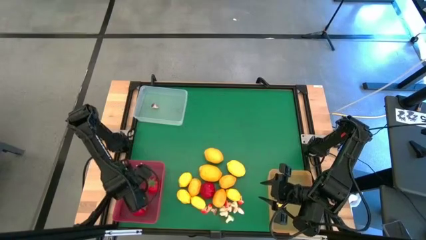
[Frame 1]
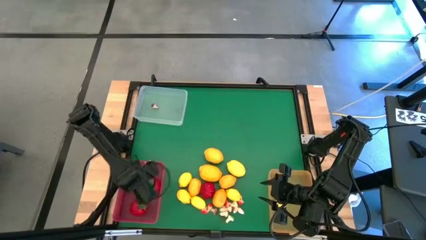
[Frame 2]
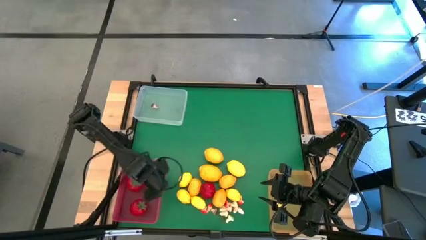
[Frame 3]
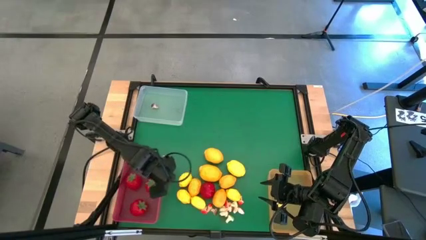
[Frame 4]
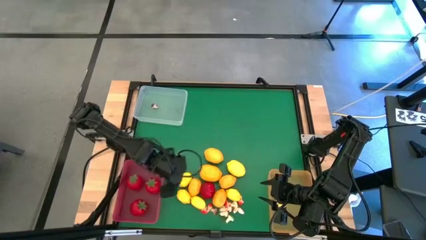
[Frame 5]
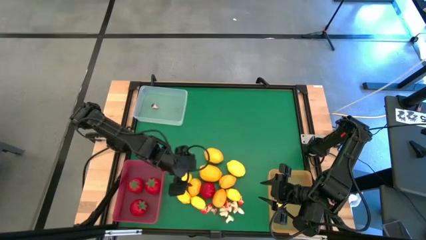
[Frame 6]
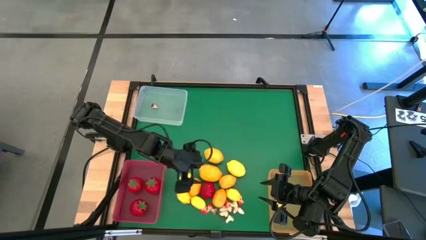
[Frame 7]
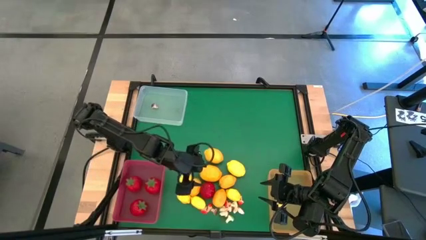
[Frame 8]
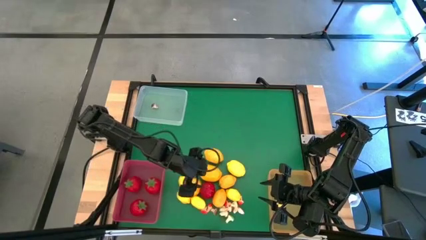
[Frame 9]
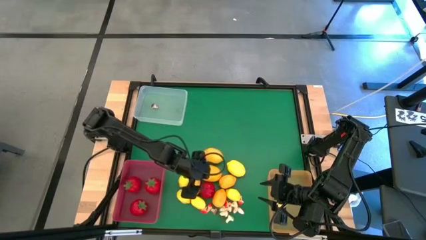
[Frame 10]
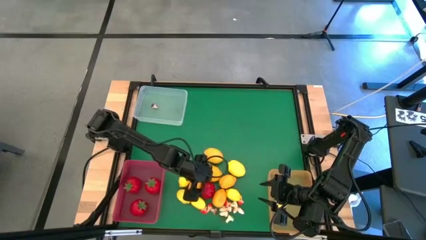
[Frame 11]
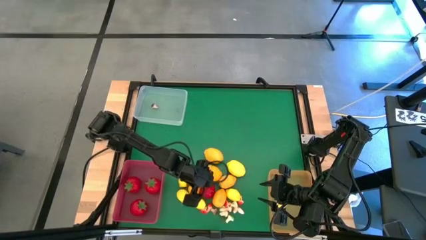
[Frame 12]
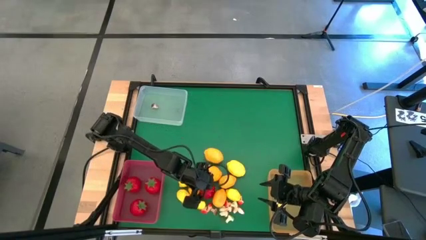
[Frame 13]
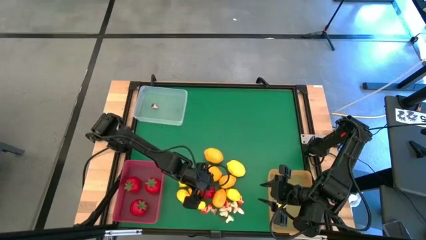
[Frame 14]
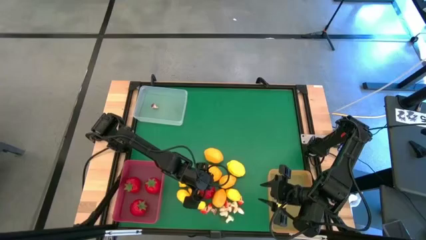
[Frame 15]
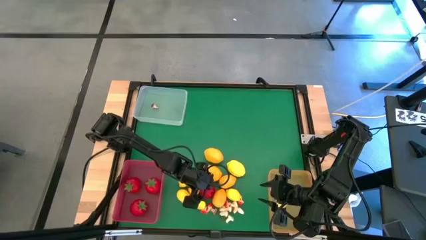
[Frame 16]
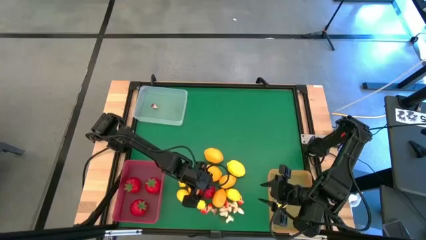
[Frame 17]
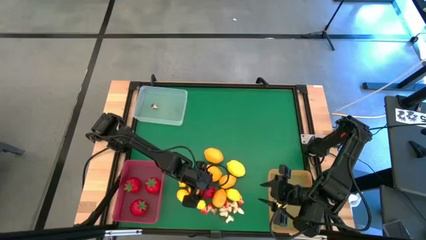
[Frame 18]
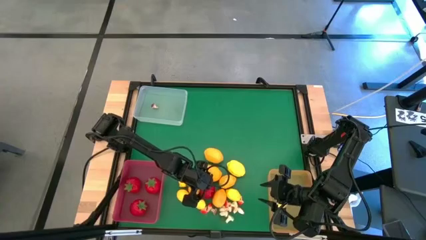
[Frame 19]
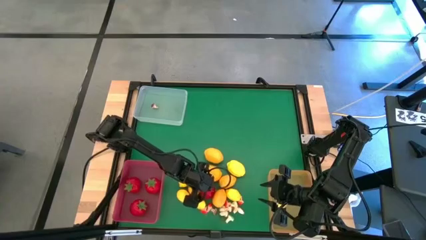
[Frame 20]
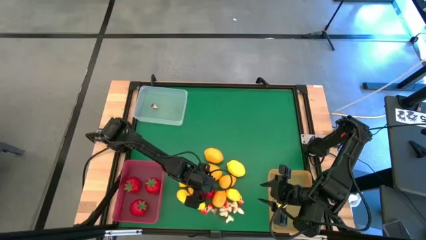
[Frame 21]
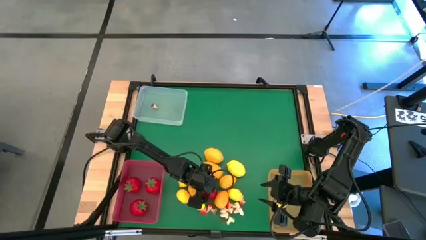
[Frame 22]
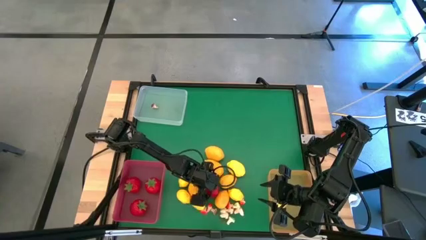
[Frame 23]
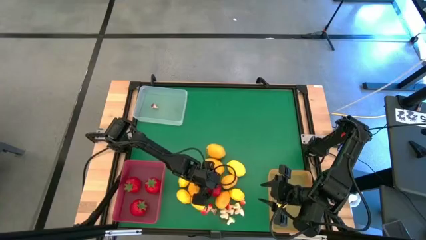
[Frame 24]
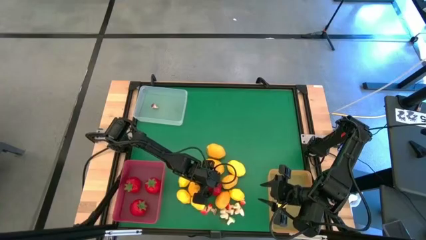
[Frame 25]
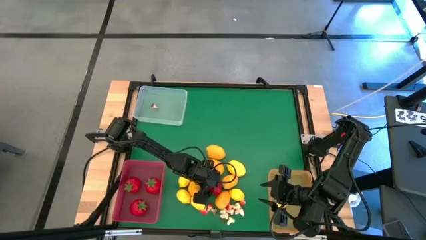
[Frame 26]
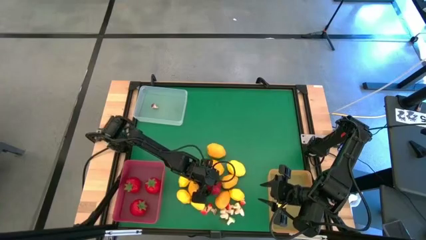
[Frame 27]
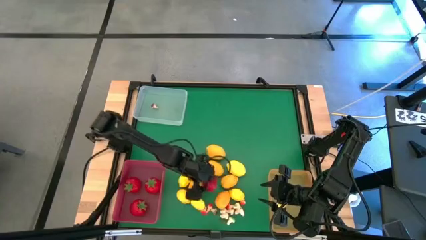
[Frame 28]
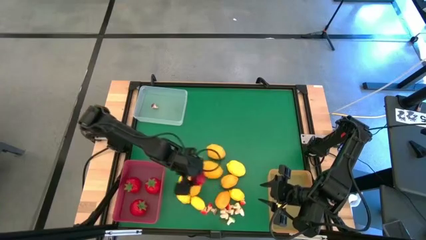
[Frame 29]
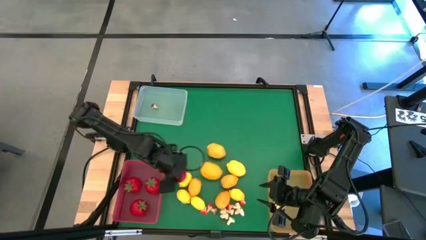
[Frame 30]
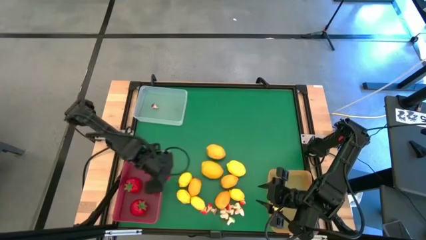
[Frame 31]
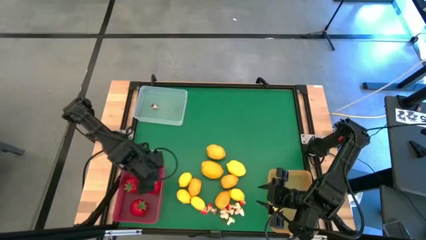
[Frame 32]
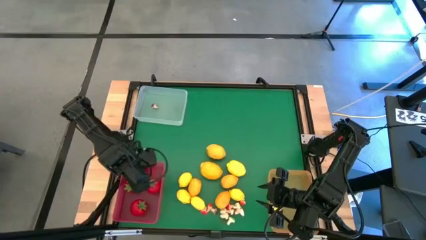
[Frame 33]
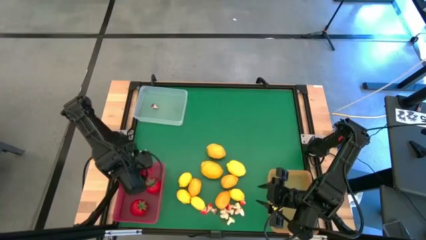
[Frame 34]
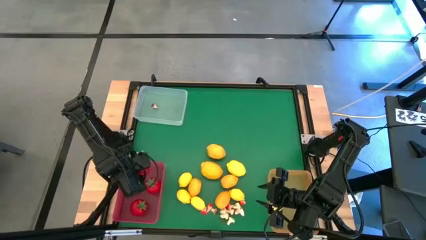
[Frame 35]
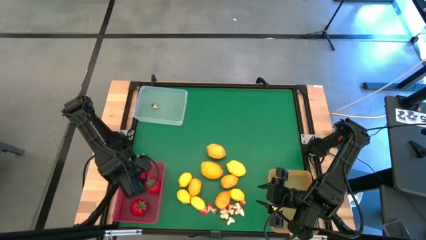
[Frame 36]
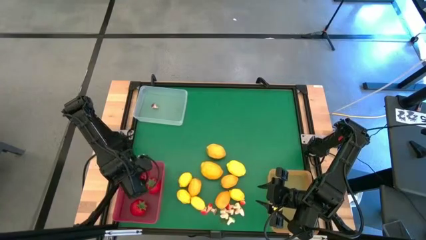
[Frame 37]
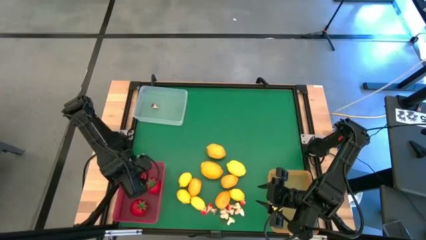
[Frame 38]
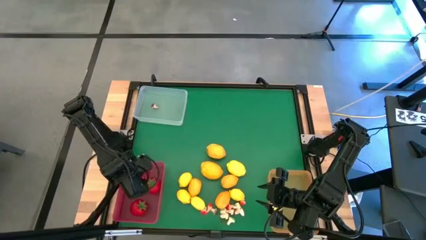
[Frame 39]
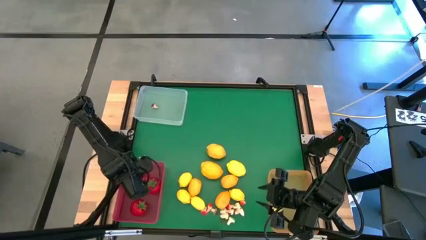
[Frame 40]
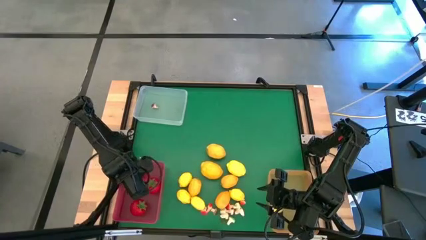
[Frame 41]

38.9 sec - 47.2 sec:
Task: Sort produce into baskets
Put the red tomato into the red bin

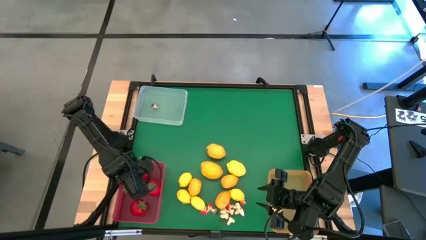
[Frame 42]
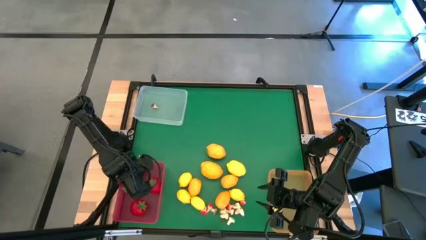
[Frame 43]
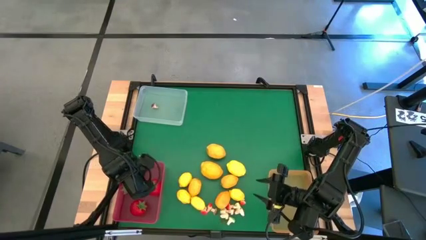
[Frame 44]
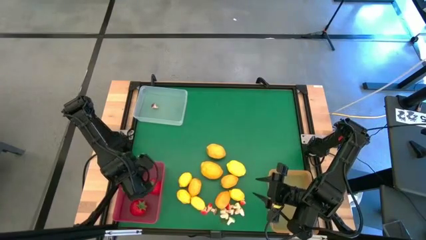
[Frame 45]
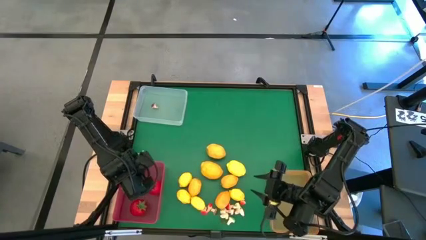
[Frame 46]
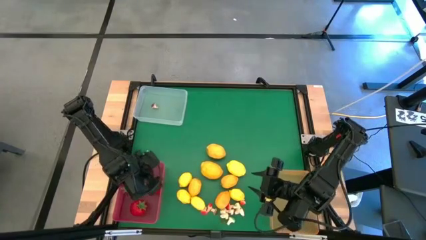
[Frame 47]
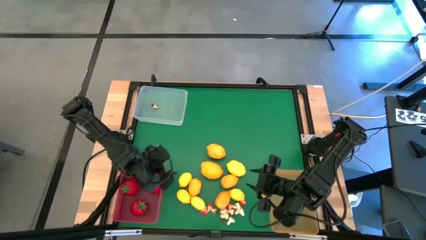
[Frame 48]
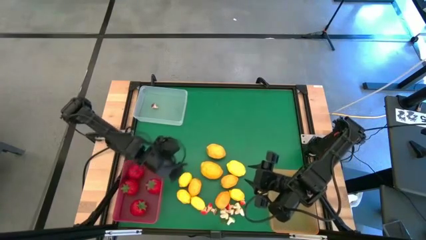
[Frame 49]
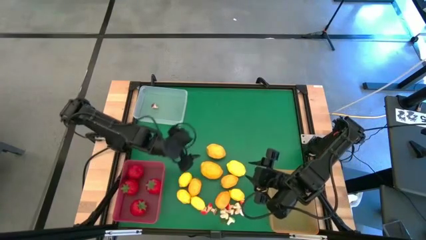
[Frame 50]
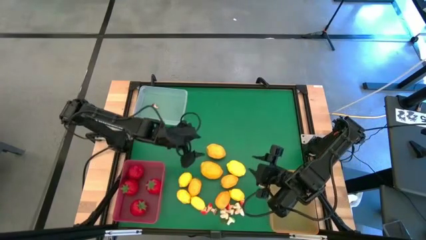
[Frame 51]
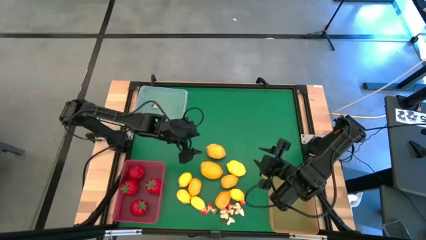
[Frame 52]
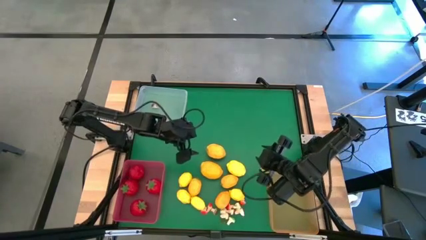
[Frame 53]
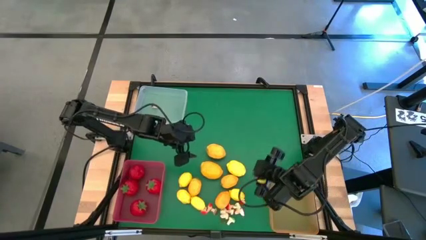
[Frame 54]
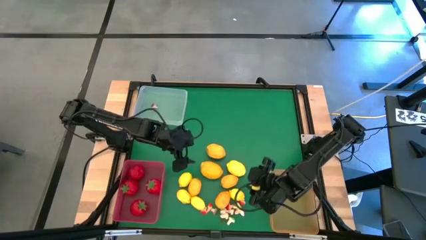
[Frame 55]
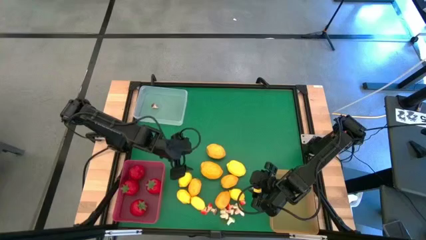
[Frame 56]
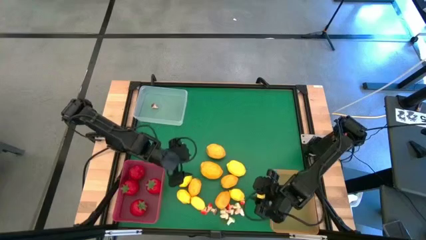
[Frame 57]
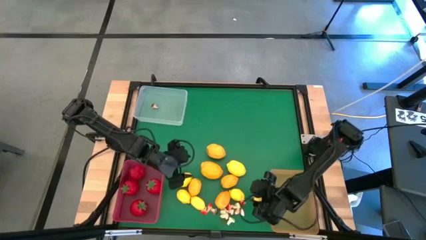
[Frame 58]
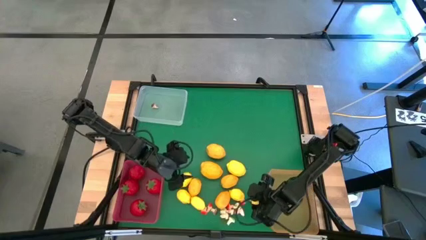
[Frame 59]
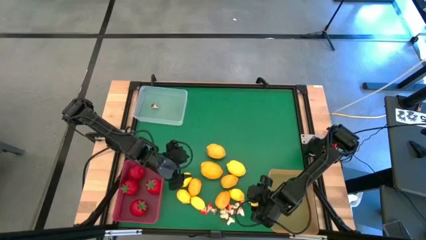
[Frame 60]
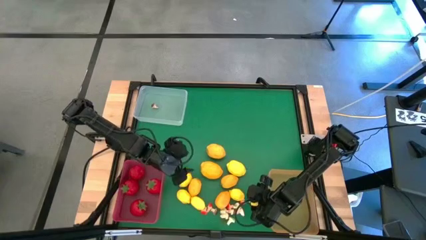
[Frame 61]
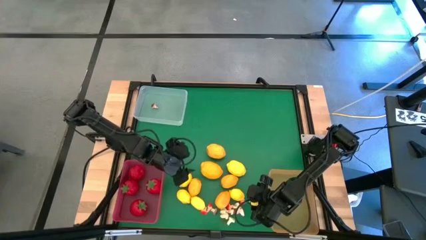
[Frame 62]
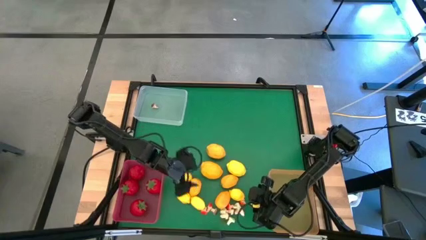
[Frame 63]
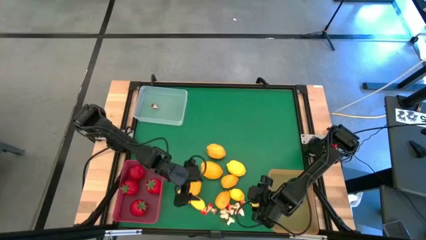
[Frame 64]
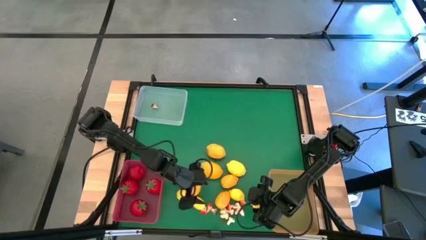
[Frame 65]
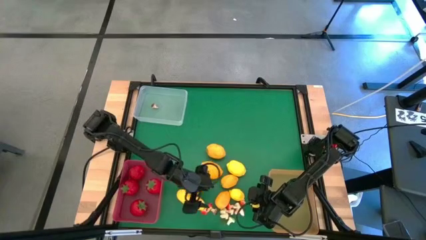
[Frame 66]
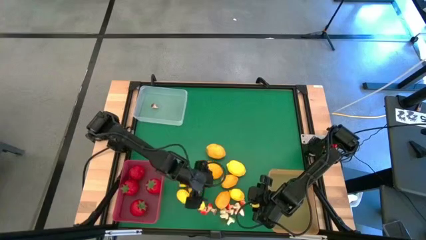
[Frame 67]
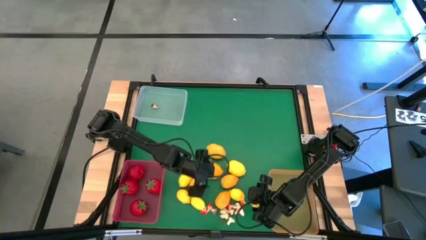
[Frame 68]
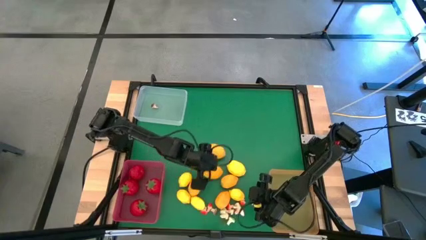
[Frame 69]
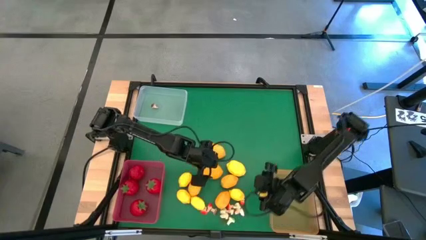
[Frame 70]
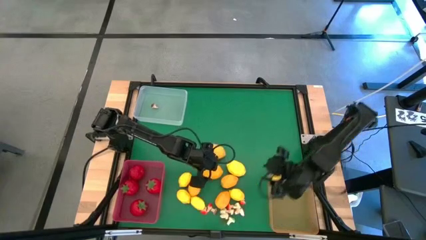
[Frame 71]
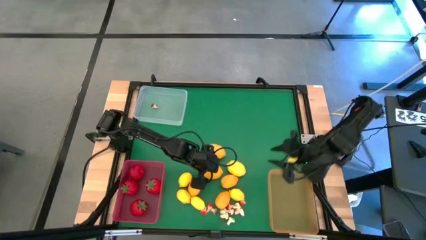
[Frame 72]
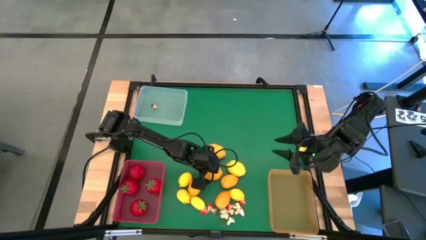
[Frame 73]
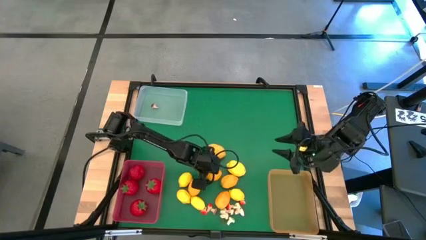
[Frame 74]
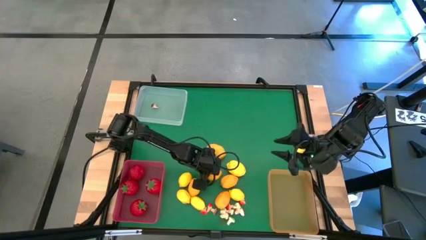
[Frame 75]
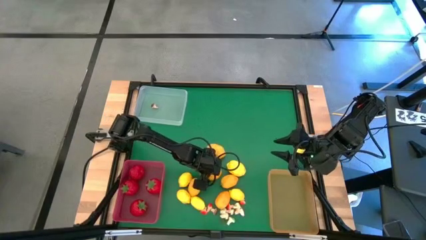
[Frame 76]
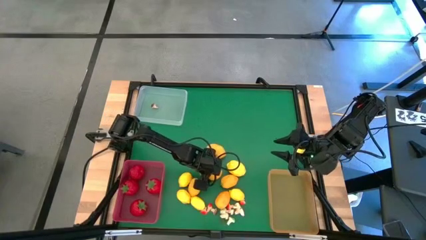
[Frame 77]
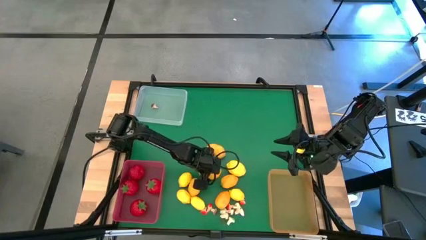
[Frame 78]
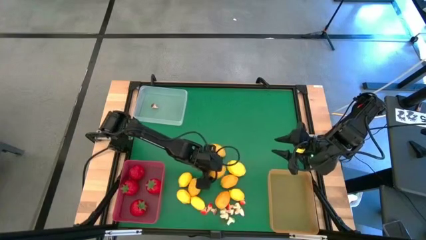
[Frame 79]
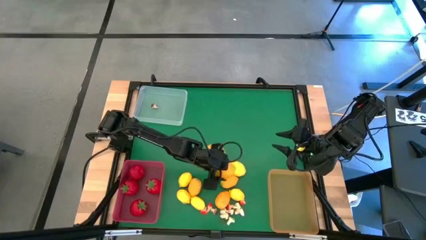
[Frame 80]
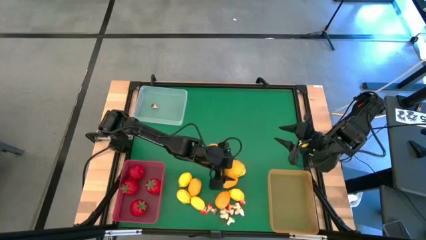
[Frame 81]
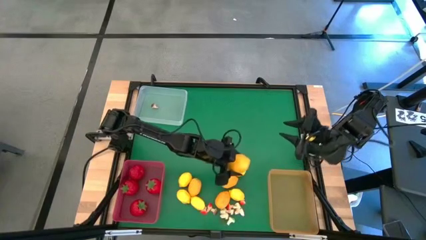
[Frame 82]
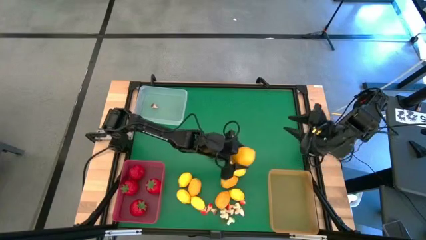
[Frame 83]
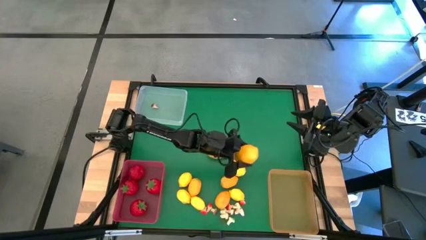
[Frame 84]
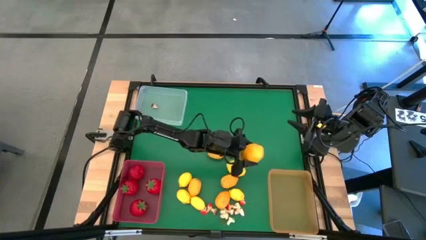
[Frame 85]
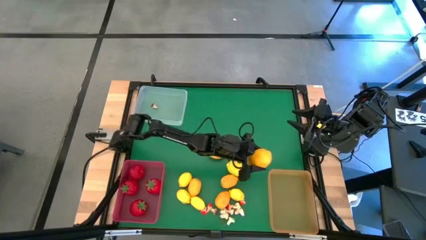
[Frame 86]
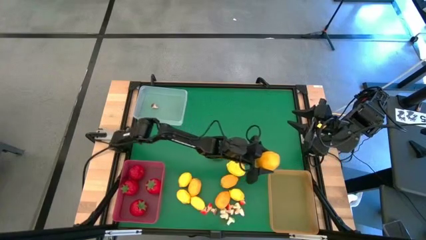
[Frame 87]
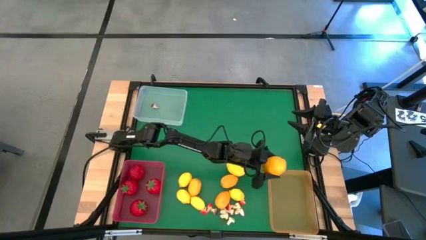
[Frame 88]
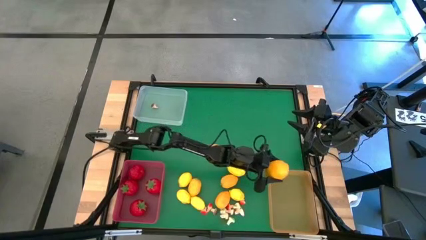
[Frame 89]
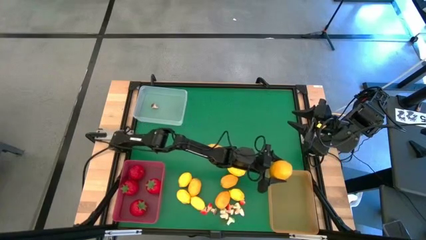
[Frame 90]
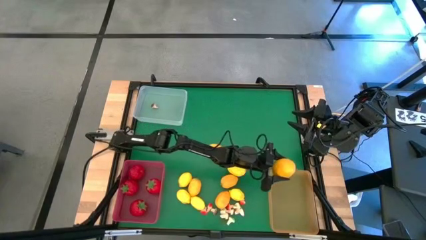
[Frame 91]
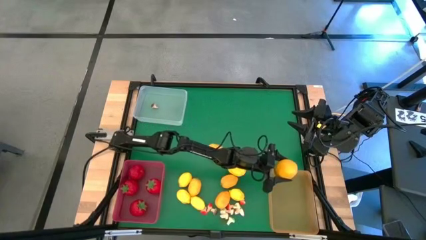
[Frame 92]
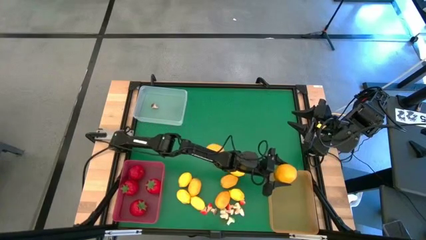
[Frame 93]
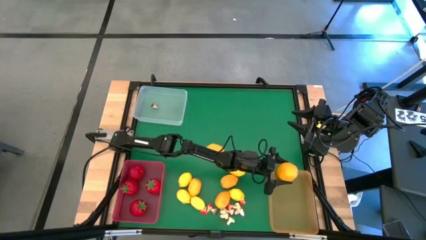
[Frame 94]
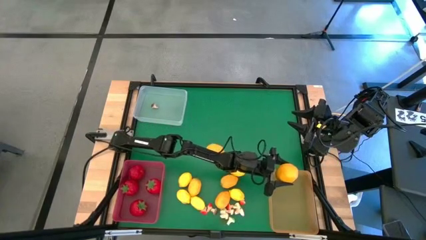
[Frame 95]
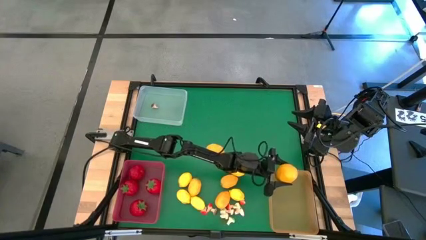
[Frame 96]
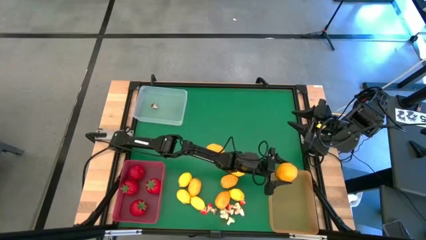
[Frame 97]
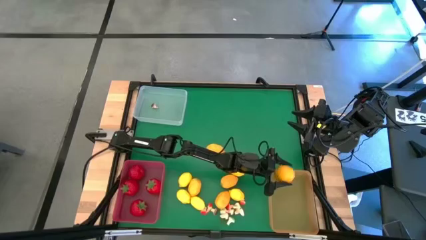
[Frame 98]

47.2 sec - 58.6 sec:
Put the yellow lemon into the orange bin
